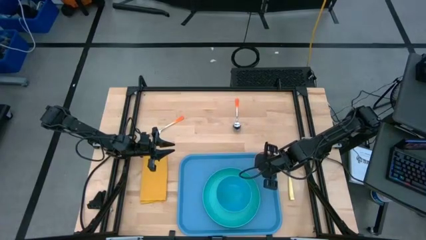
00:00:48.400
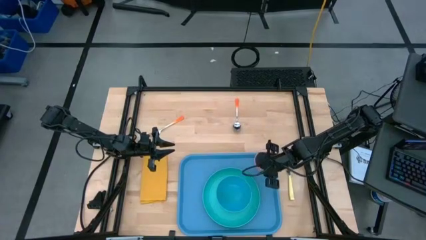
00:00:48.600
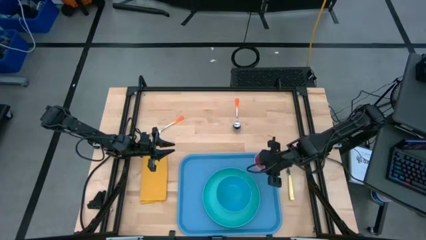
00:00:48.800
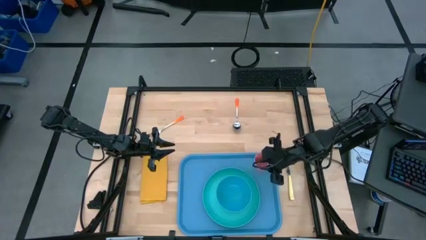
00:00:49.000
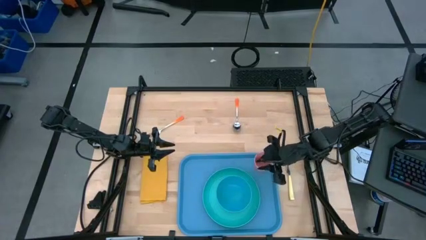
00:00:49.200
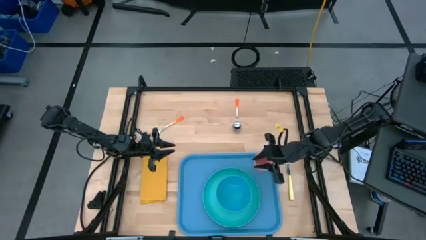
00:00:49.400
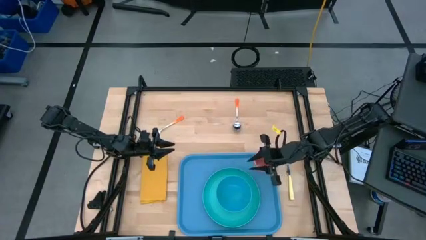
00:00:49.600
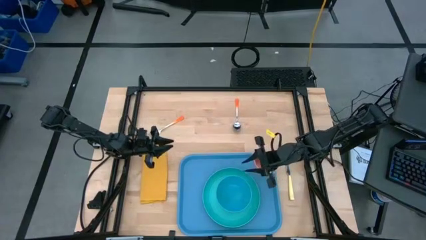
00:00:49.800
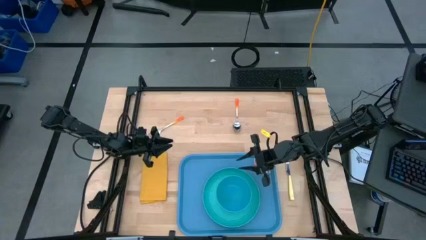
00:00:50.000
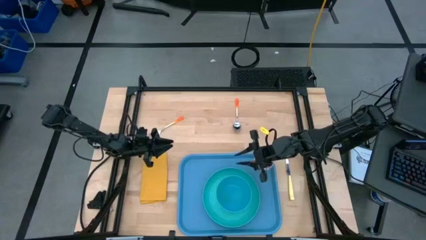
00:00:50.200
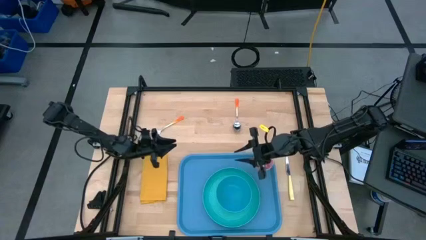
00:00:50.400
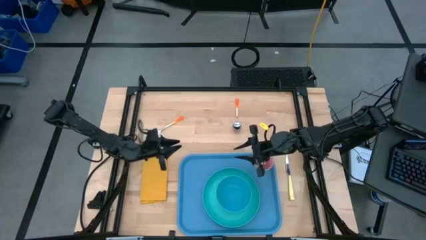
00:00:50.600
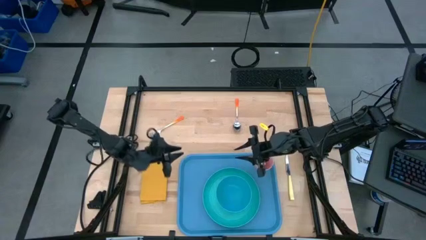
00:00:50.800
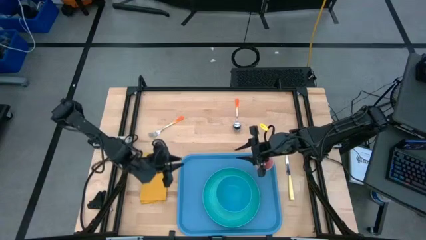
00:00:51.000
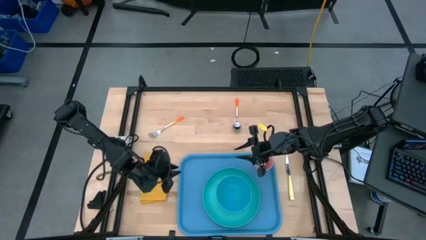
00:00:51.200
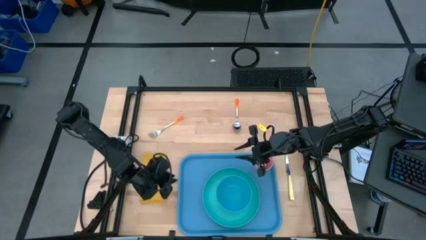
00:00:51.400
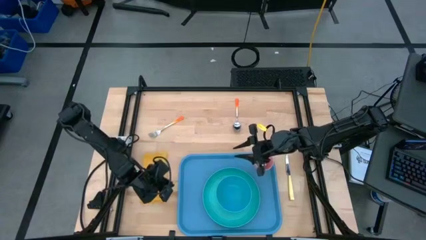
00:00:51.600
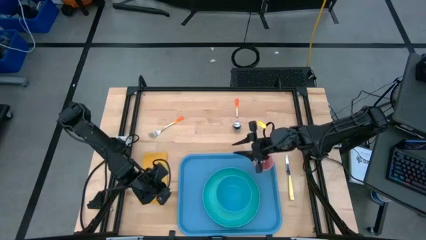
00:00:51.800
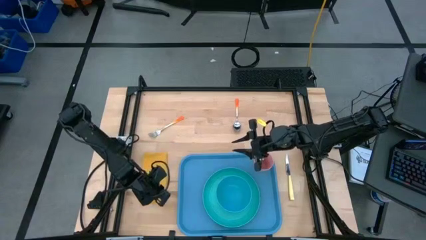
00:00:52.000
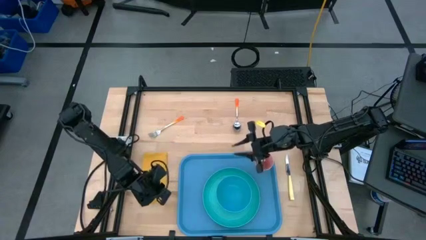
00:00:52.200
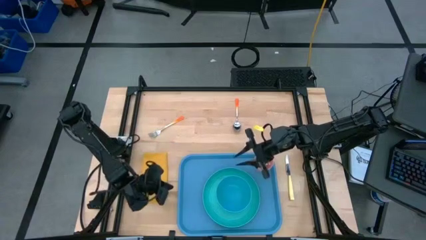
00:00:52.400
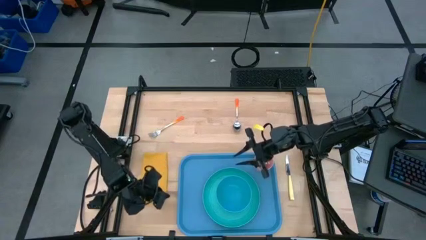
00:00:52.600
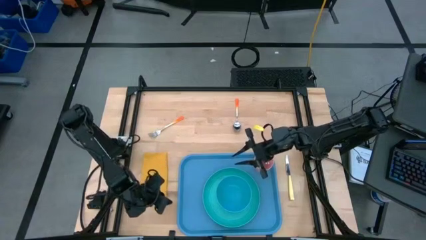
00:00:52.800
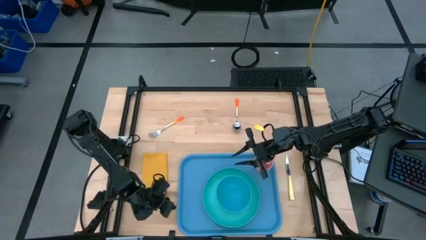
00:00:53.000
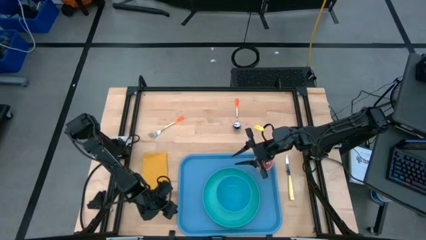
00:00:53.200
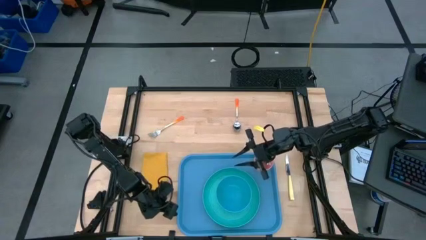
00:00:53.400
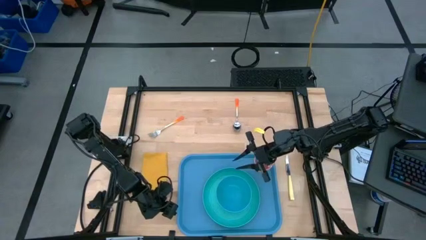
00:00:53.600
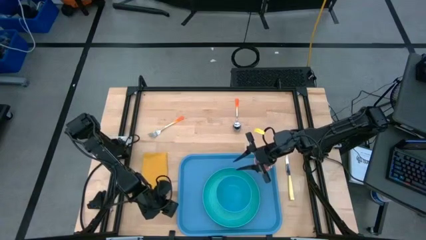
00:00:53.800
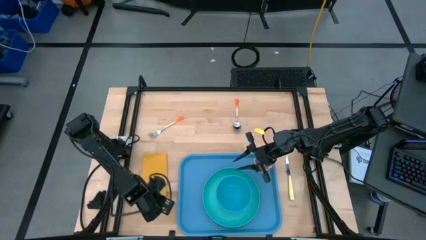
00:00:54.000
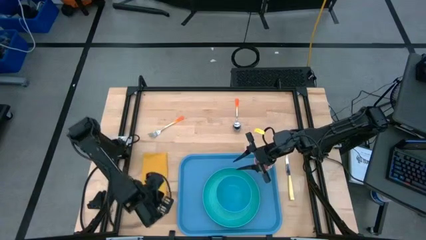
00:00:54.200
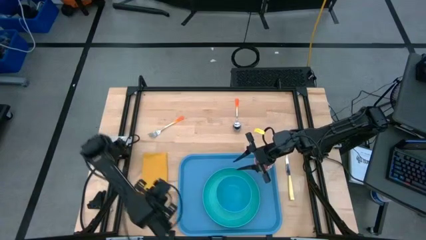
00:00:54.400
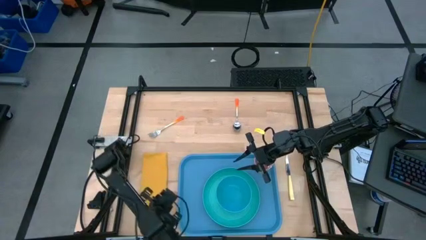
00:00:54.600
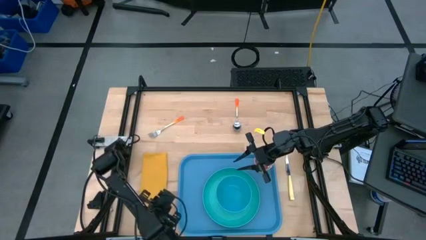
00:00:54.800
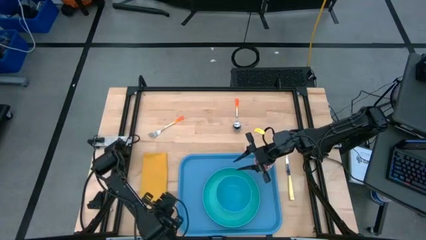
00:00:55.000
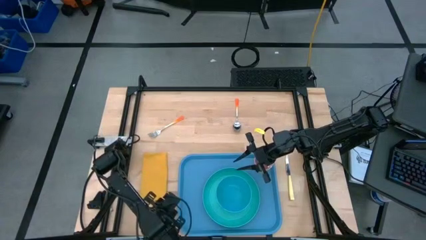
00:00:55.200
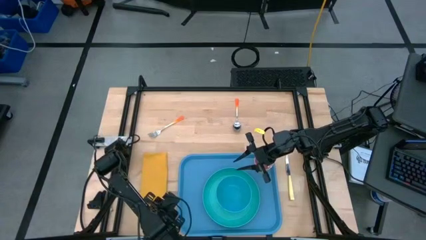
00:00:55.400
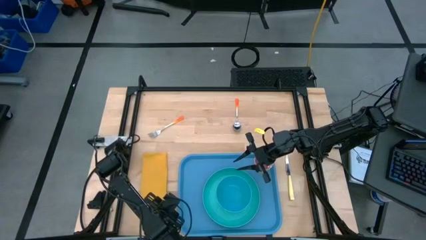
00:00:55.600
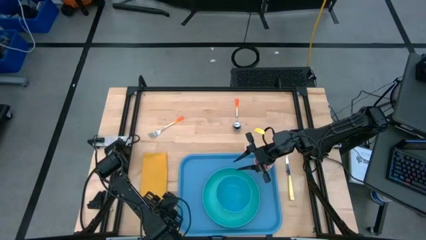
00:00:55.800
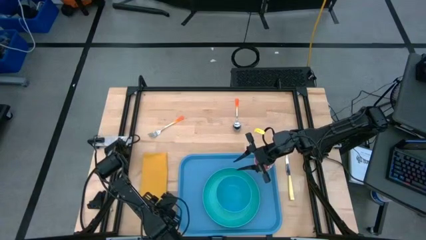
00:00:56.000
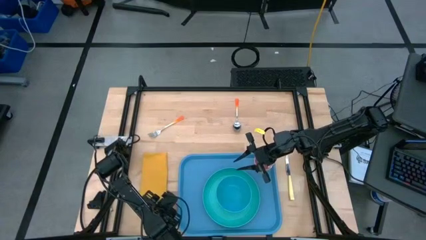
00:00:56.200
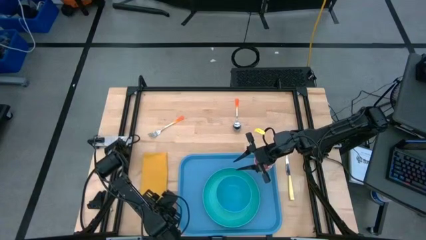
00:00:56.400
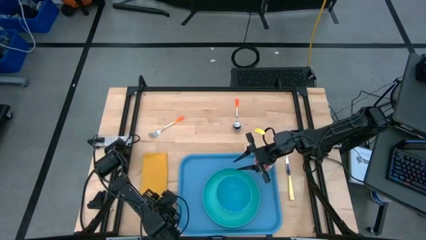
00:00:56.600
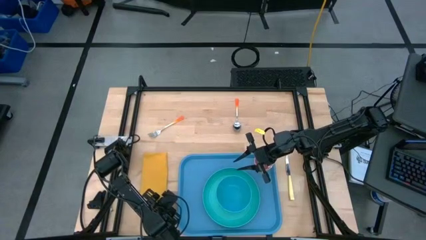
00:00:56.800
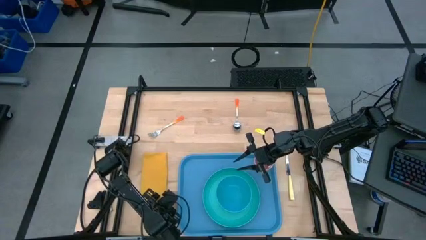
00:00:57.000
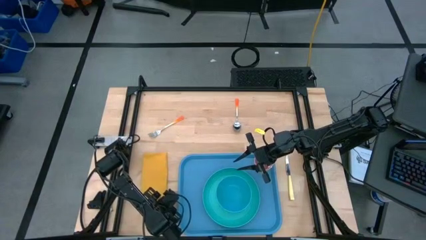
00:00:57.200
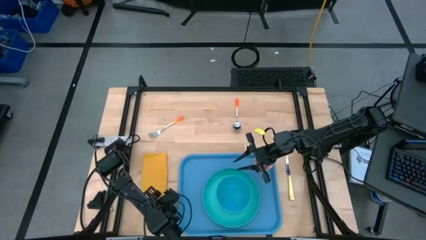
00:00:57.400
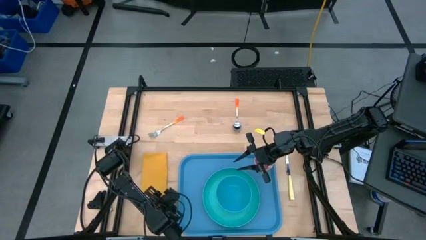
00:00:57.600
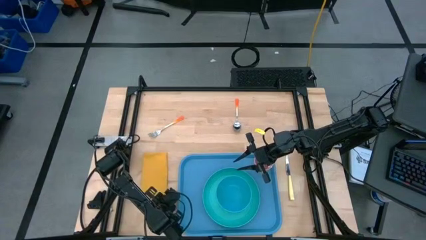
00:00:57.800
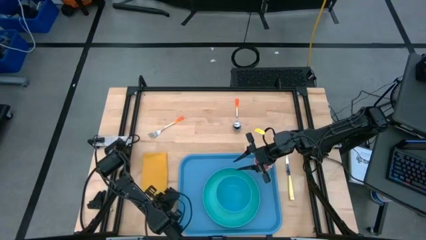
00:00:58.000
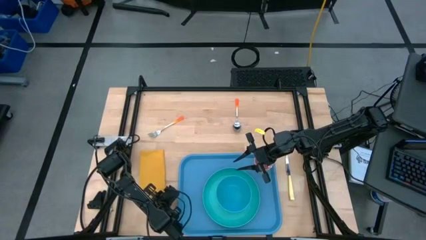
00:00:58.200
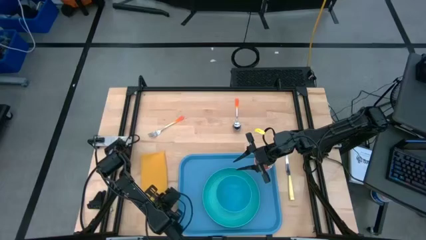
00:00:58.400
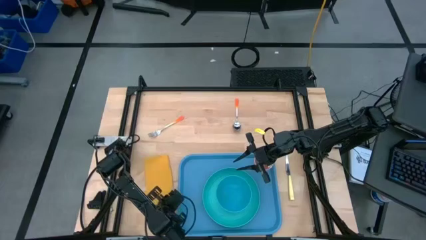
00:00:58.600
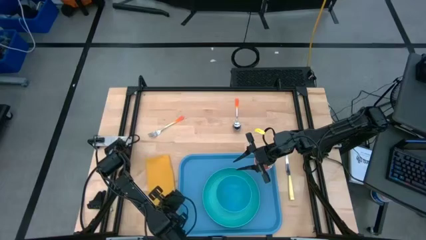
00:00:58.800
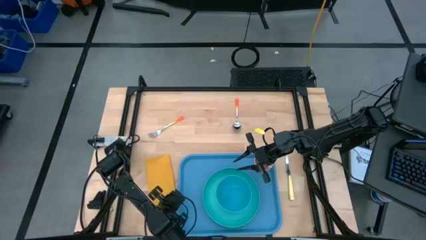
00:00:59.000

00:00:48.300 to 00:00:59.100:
Task: Set up tray
Put the yellow napkin on the blue serving tray to the right of the light blue plate

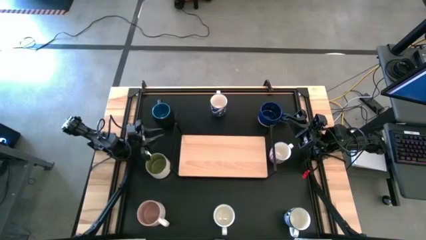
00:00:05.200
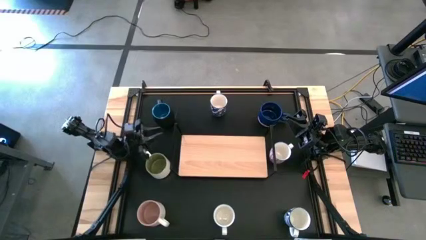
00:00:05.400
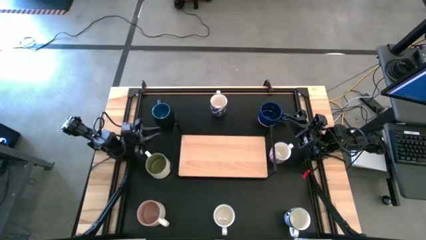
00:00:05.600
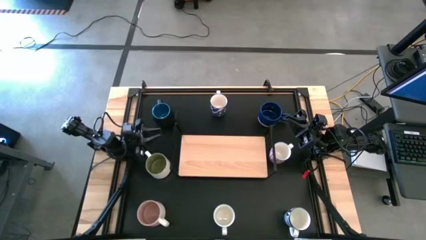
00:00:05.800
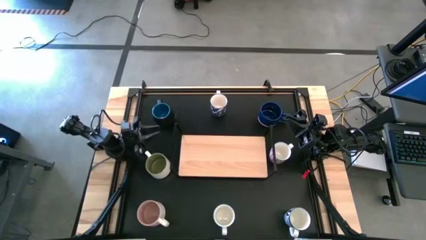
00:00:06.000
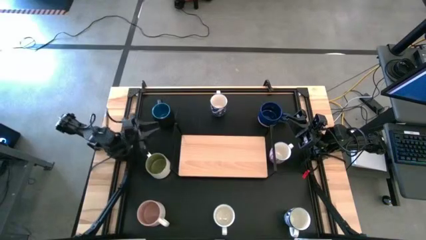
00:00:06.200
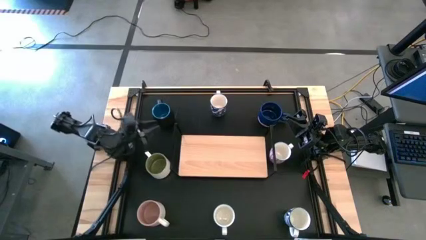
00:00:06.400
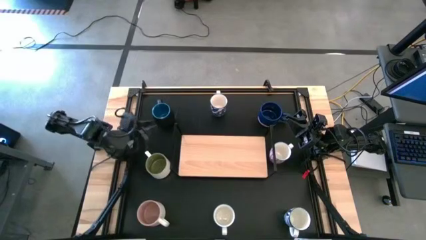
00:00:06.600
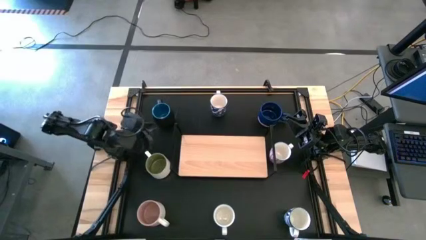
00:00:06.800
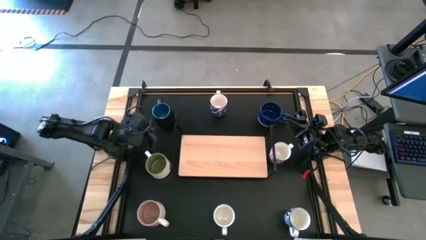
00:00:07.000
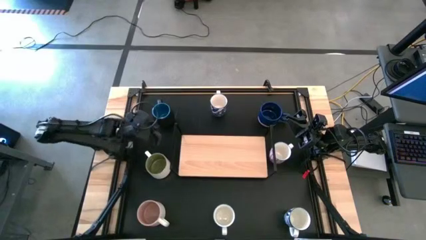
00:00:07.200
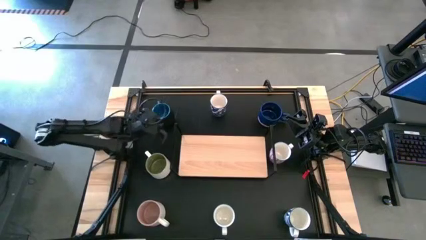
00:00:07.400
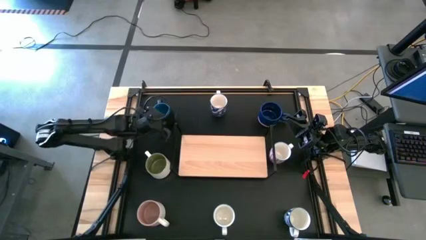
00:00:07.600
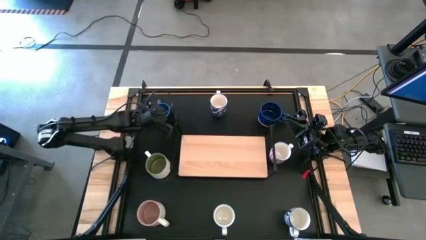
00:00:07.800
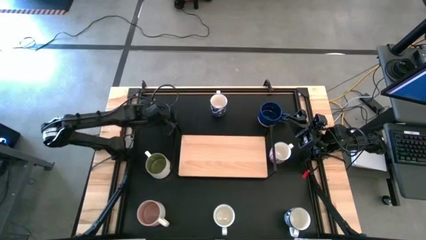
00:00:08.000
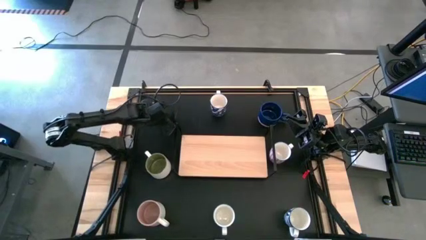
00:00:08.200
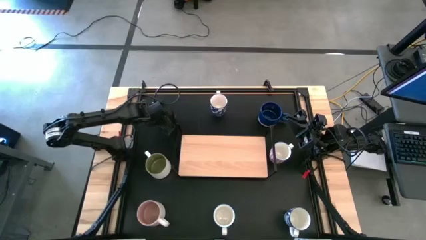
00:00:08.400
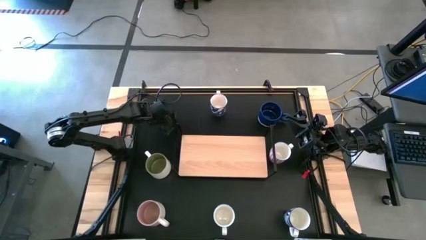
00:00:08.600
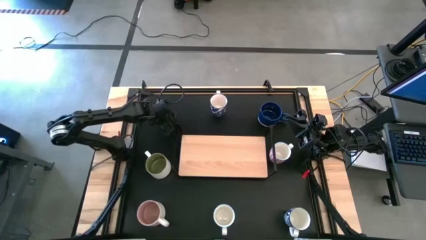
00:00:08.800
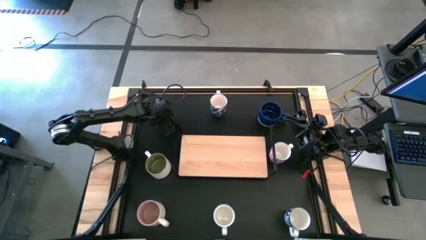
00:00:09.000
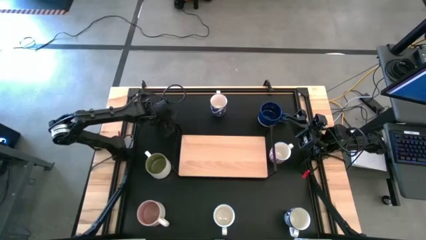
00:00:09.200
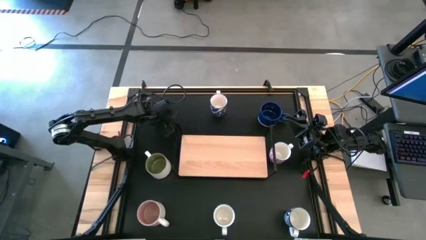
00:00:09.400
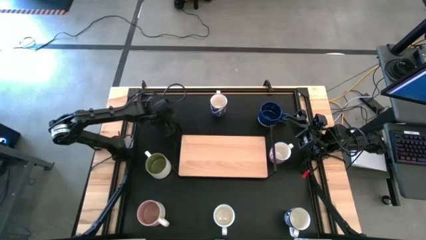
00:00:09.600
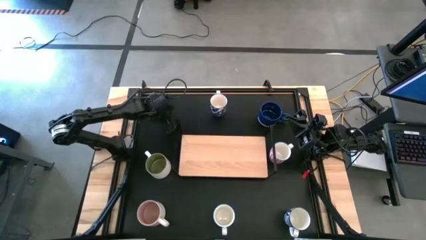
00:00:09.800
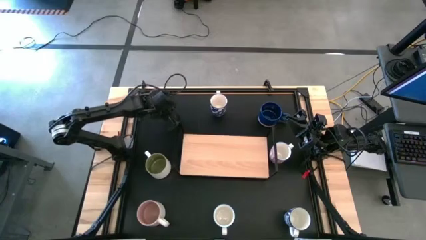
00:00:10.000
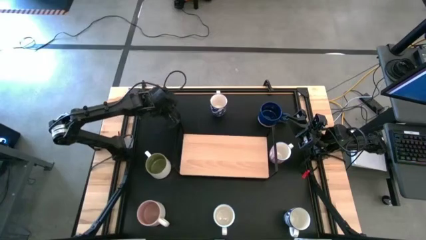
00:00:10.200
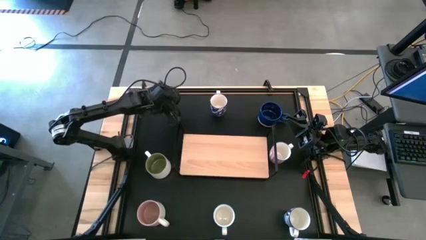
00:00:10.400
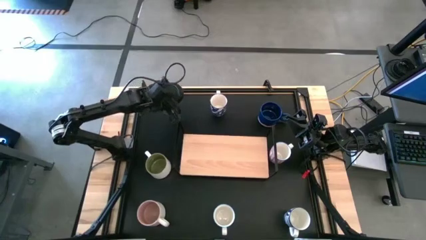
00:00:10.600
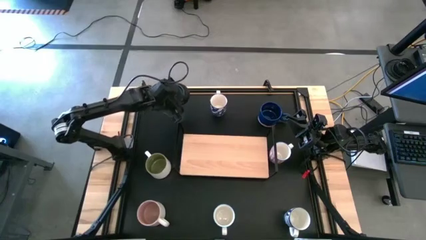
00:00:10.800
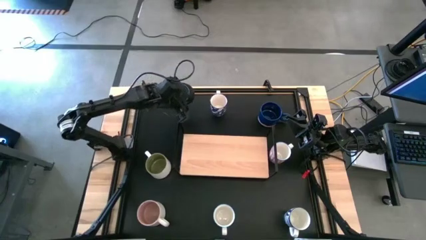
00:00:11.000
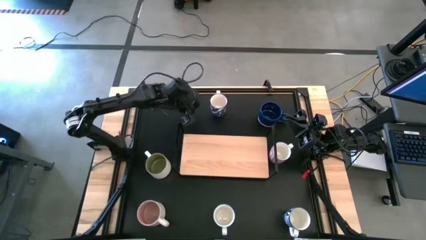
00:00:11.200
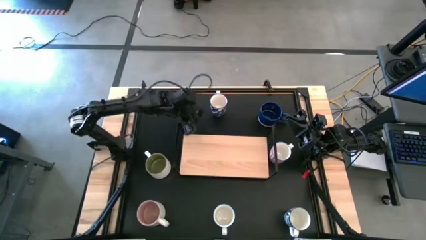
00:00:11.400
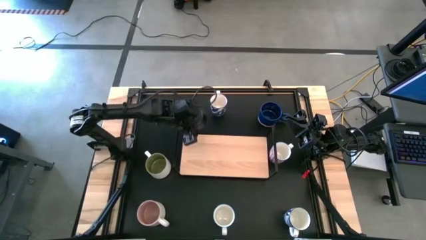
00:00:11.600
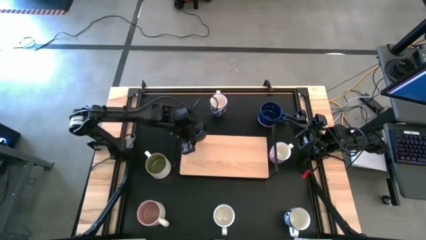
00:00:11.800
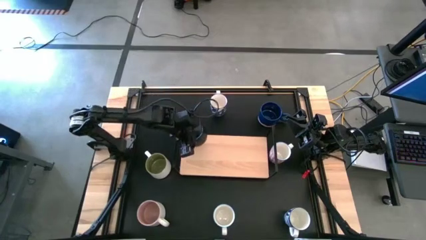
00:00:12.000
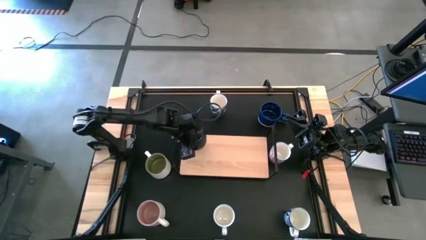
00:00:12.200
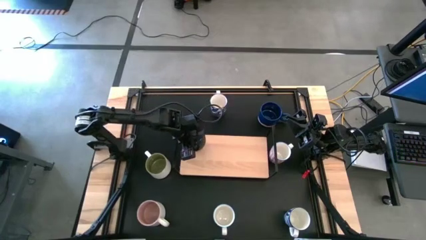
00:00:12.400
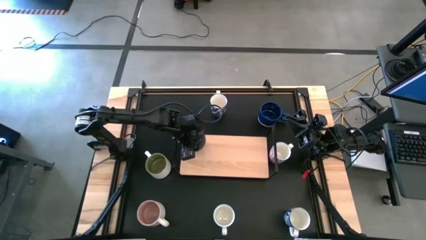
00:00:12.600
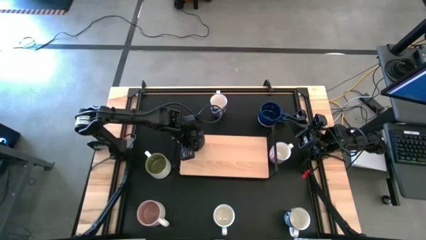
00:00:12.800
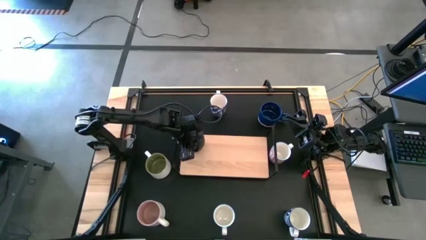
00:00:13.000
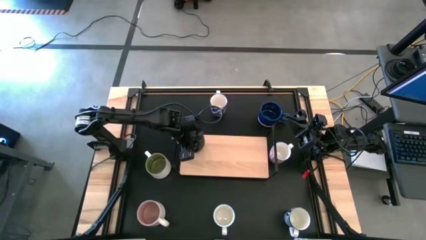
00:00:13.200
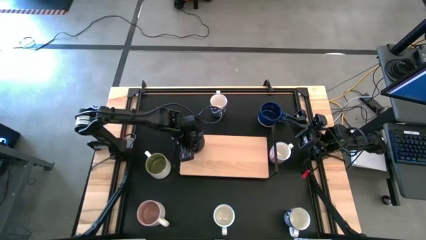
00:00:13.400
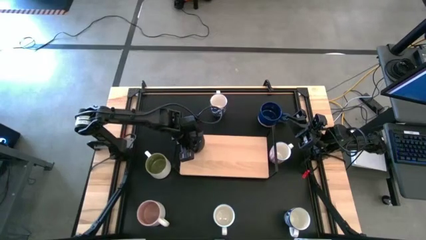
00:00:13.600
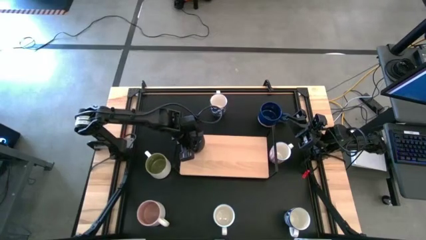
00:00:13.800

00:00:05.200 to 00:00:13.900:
Task: Place coffee mugs
Put the blue mug on the shelf
